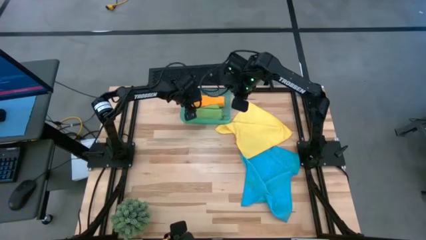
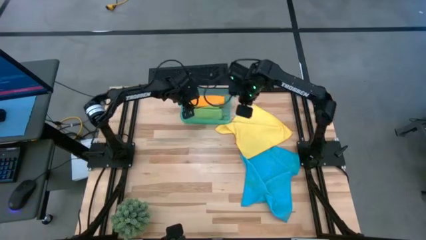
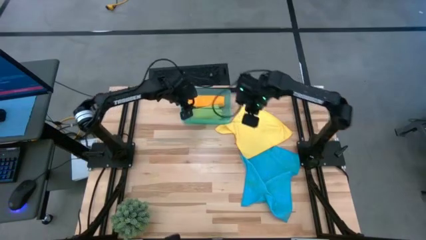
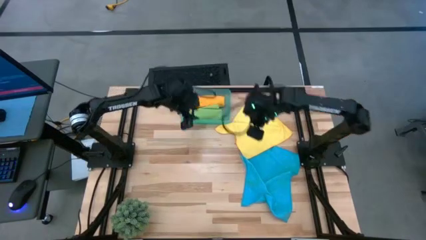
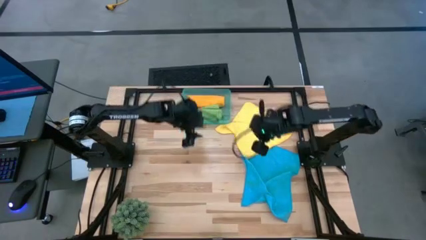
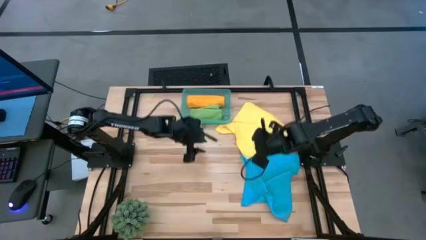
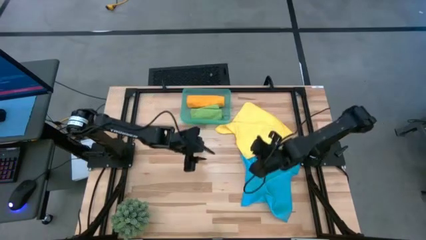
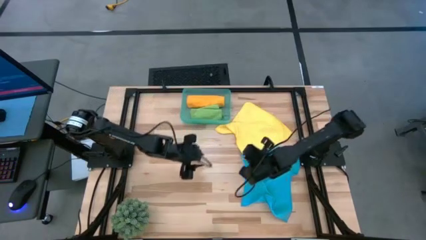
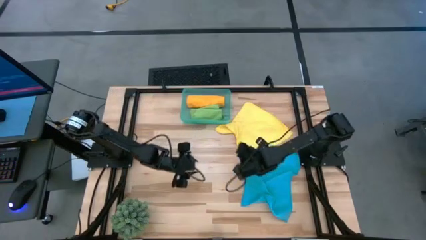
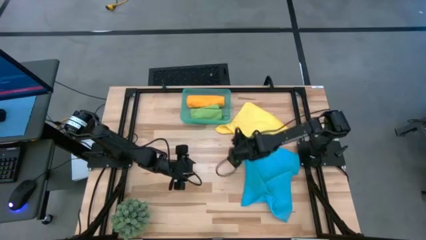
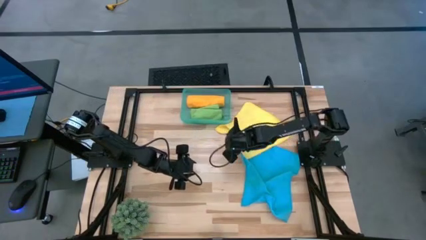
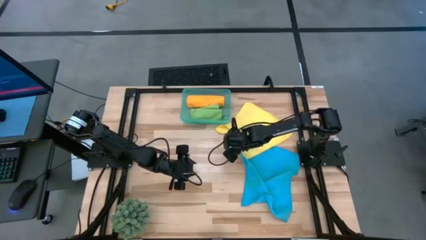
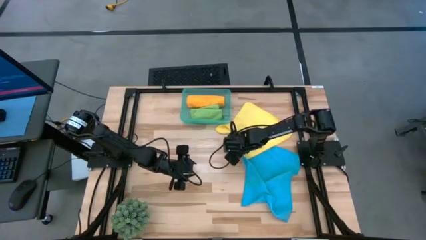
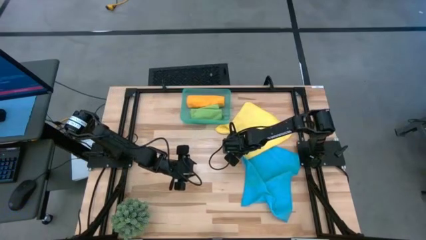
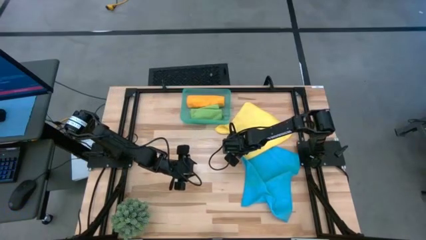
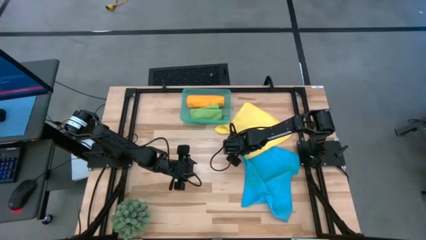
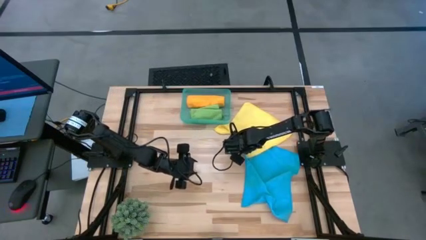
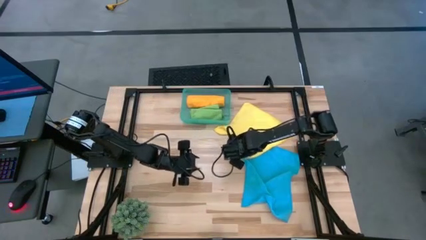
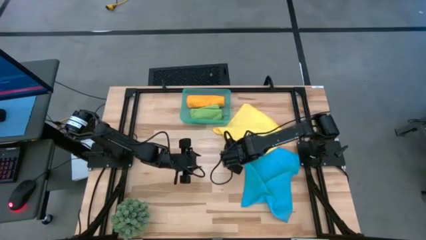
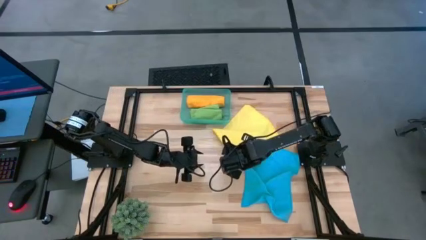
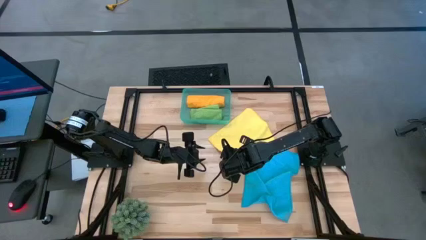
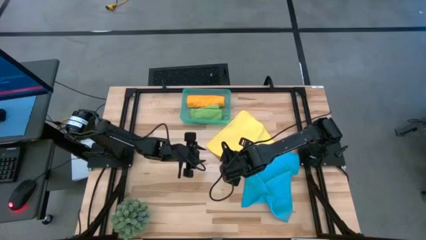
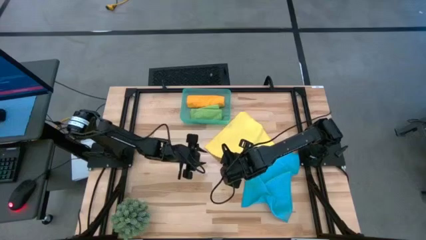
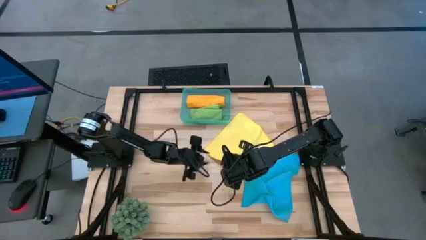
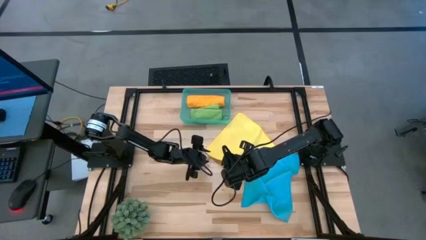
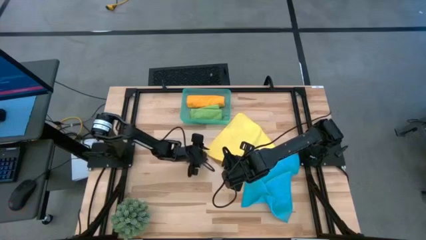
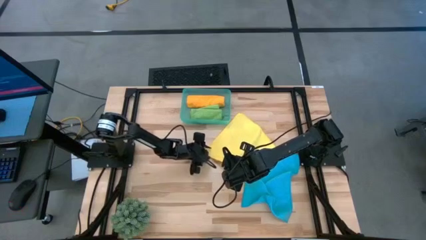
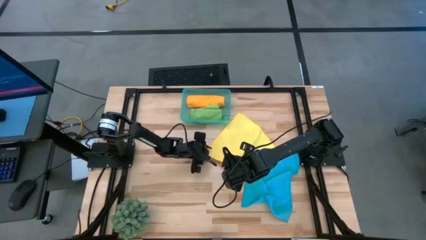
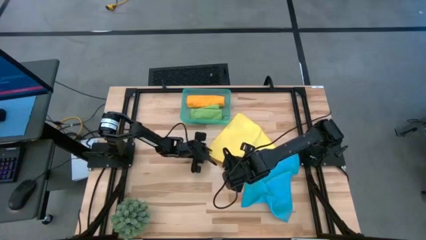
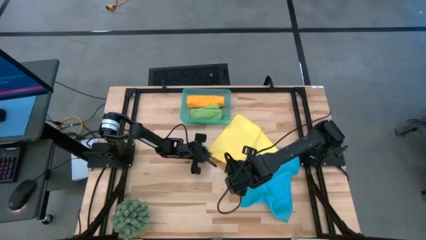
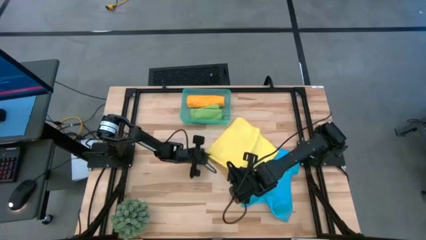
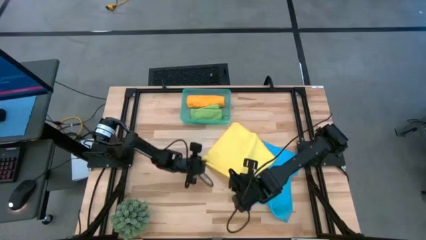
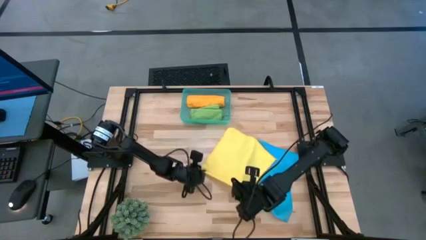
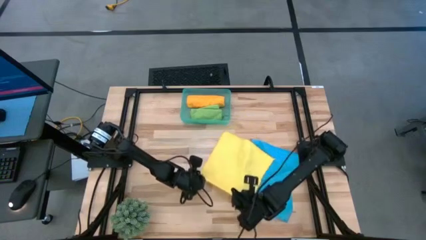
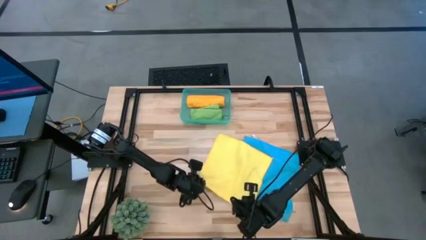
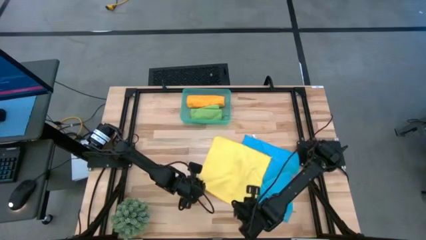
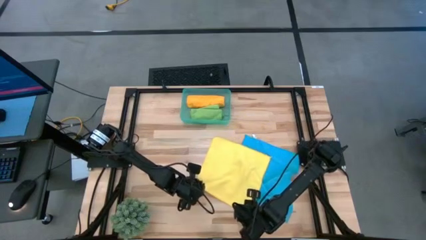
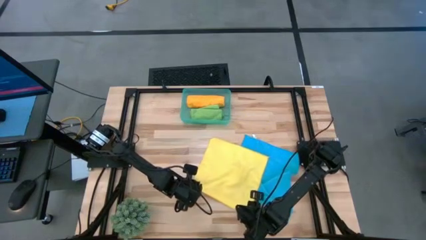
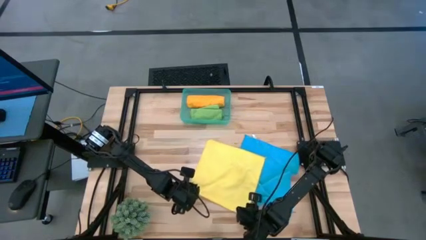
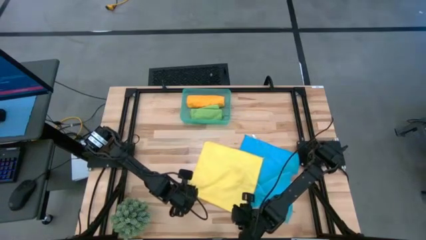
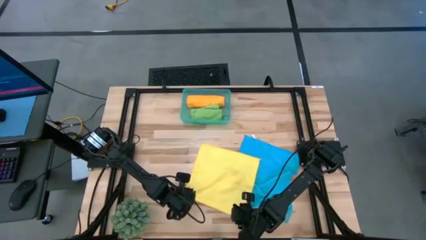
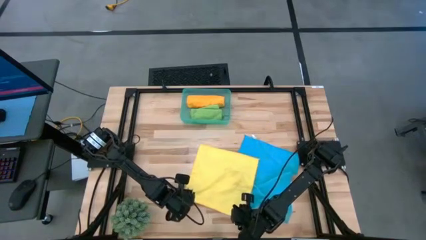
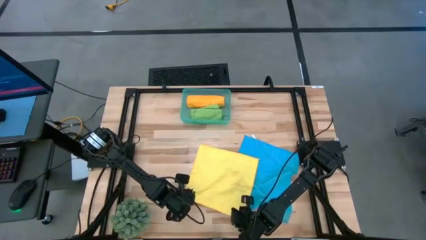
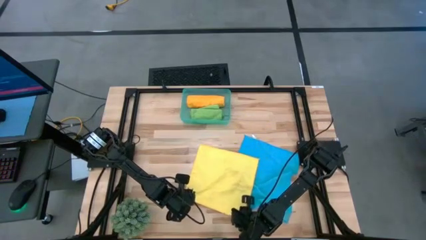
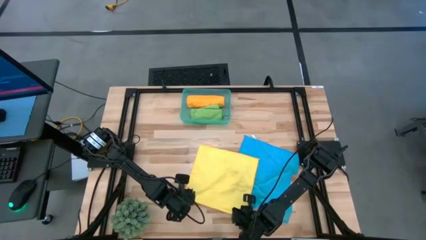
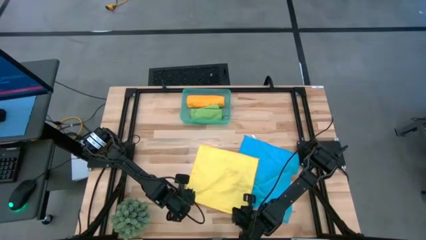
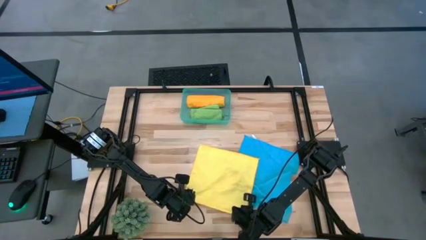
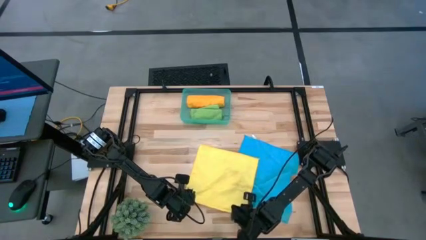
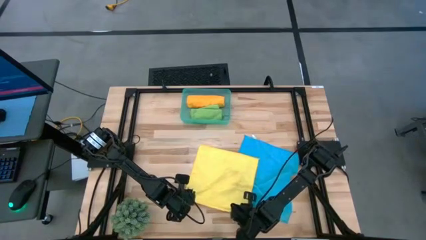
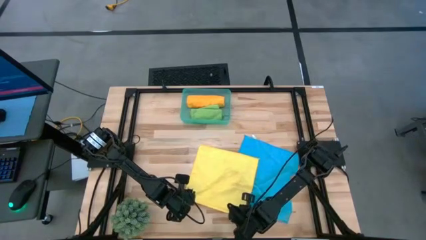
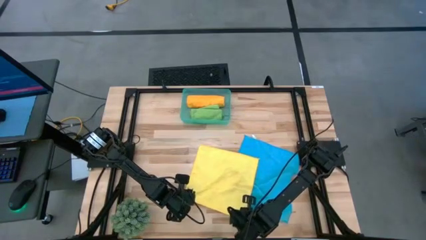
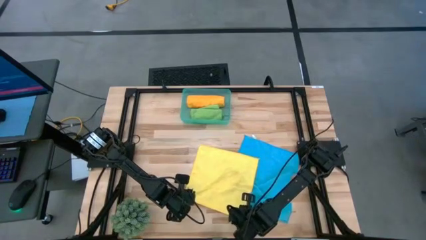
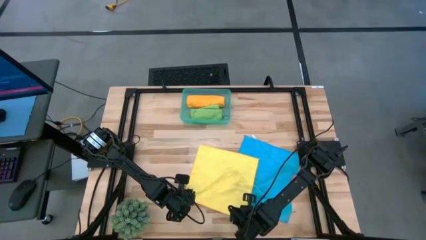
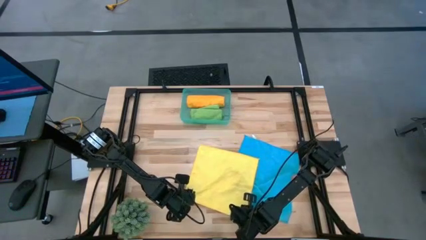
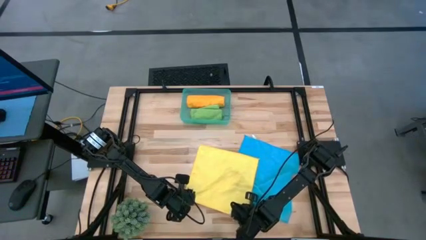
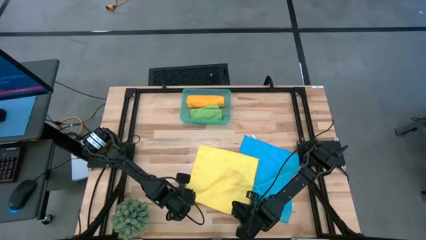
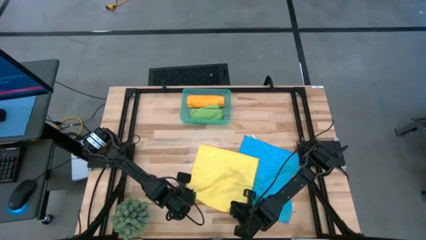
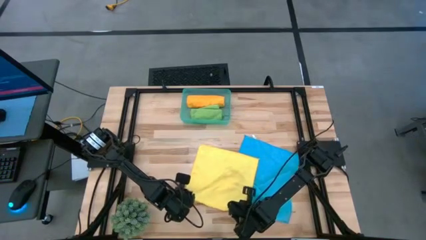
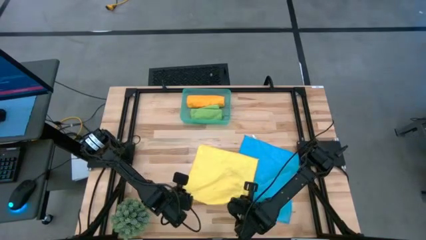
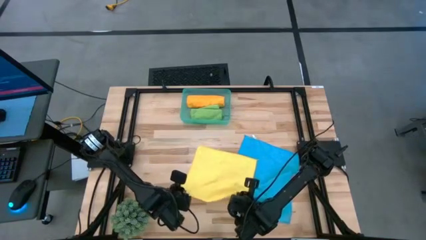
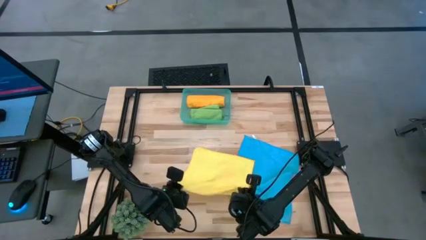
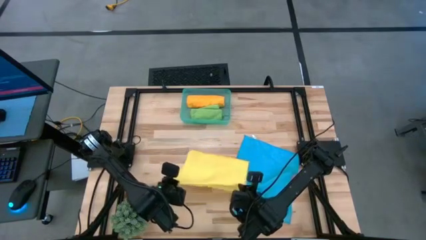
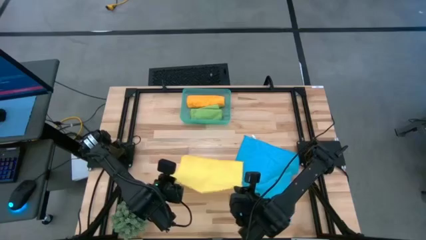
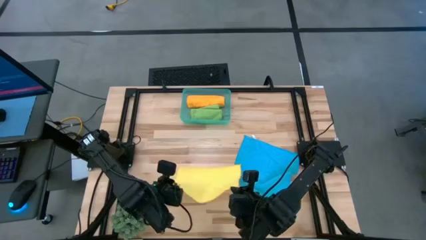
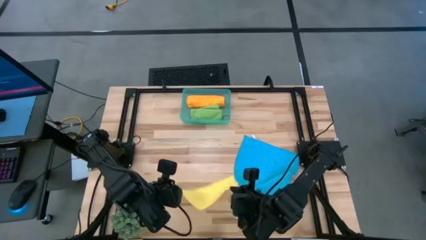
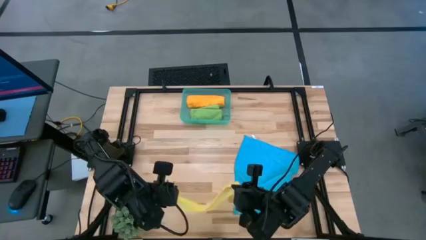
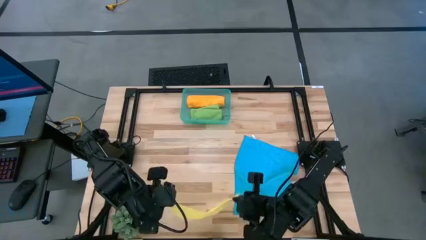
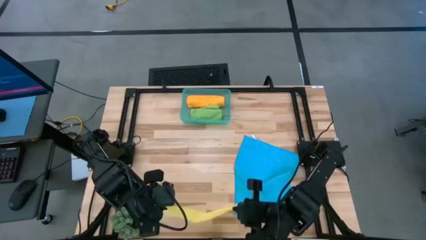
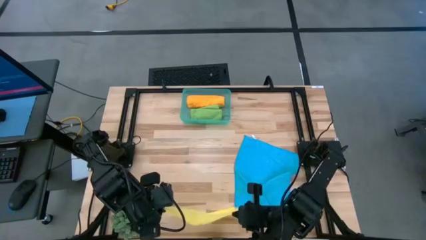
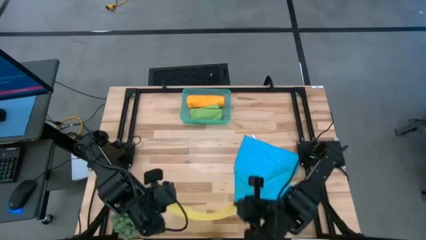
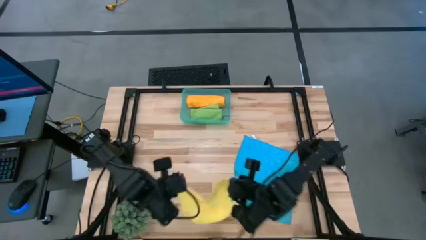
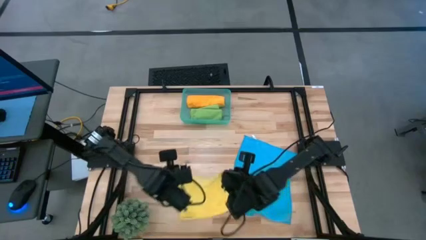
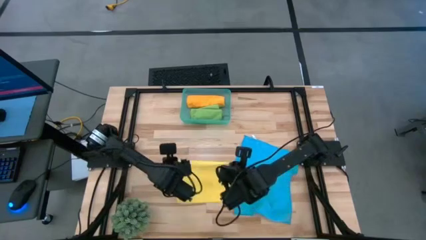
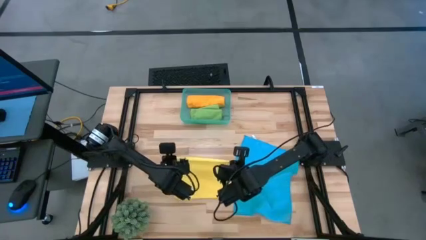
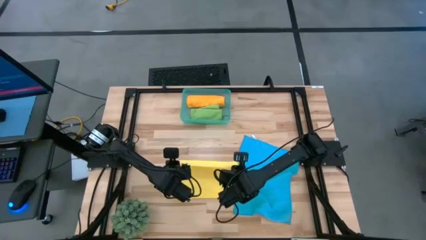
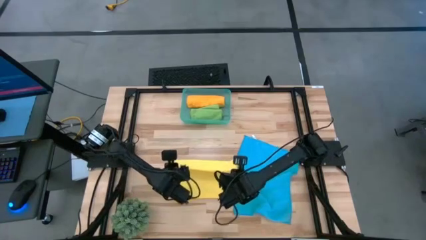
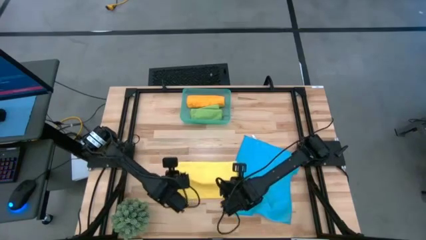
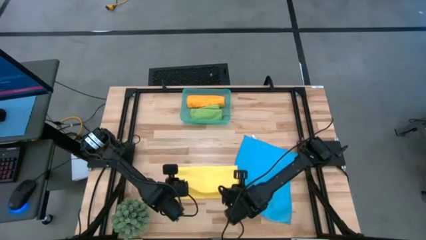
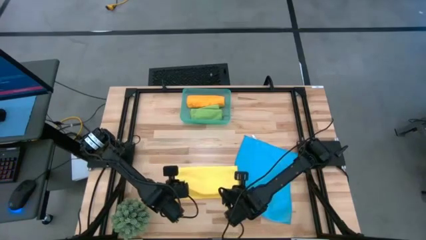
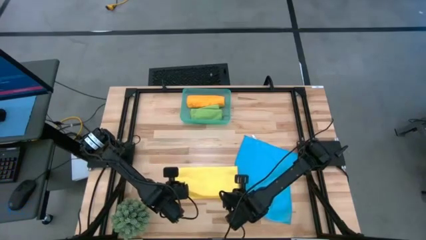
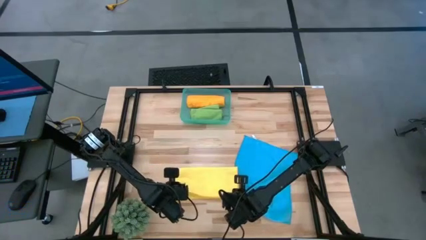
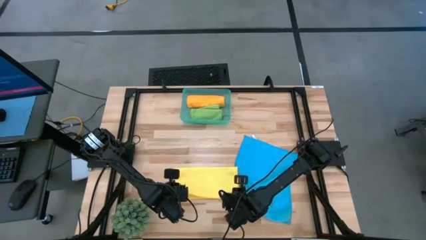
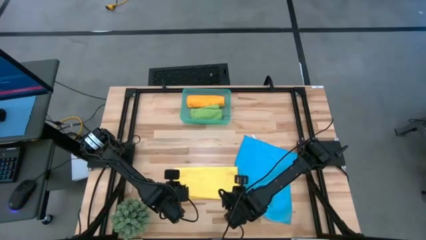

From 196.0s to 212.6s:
Task: Roll microfiber towels into tight, uniform cylinder then place into a basket
Fold the yellow towel
